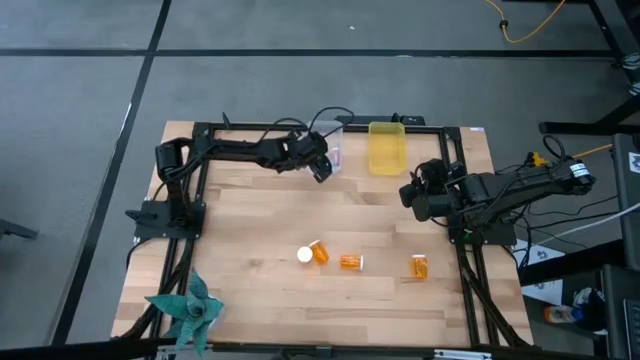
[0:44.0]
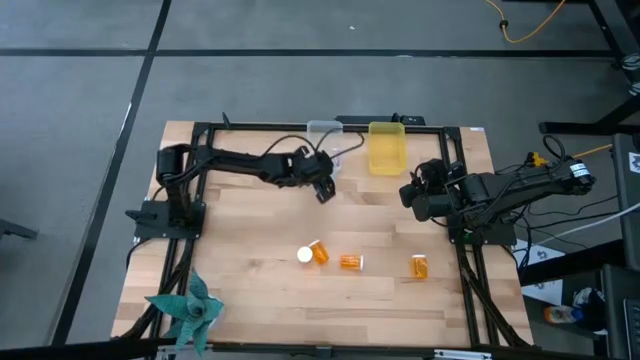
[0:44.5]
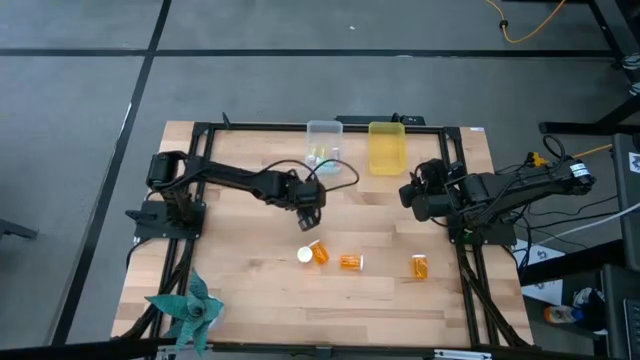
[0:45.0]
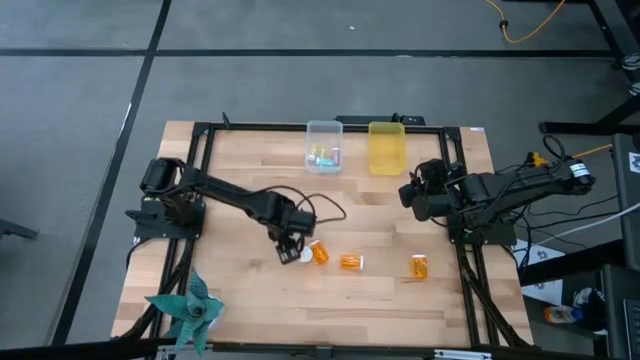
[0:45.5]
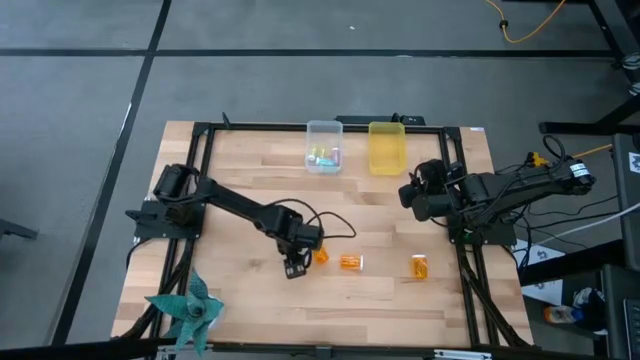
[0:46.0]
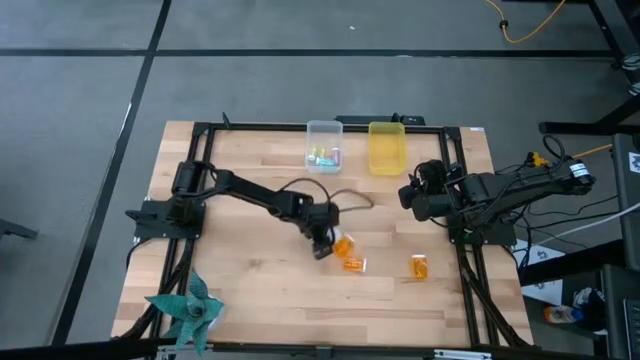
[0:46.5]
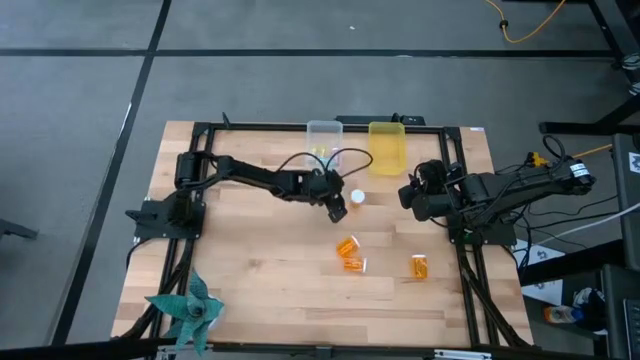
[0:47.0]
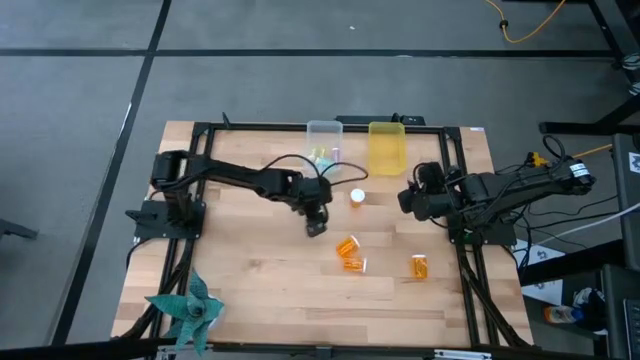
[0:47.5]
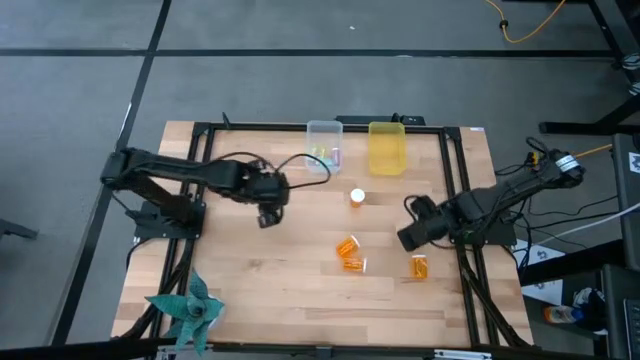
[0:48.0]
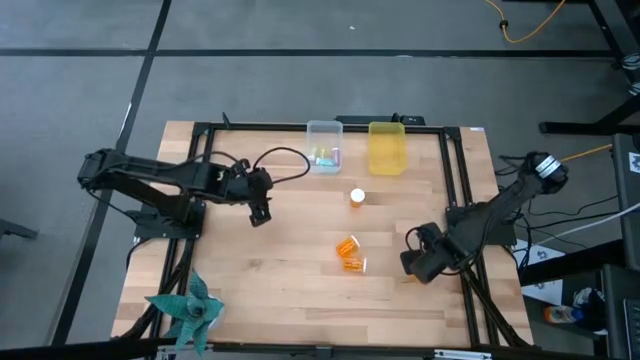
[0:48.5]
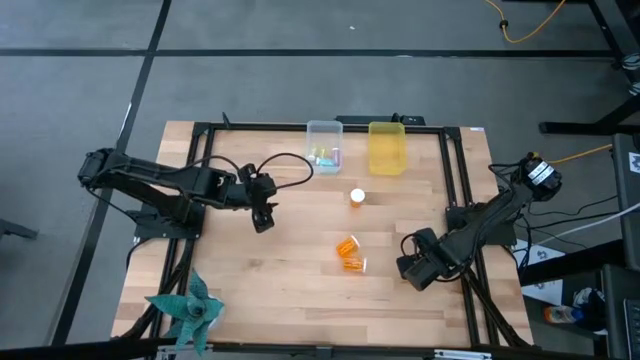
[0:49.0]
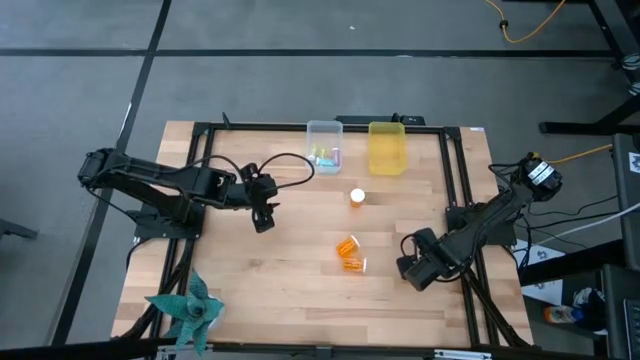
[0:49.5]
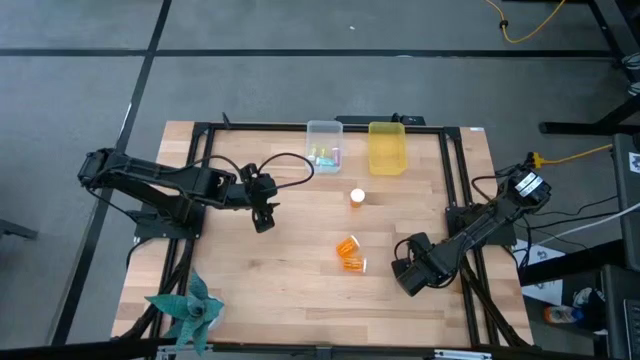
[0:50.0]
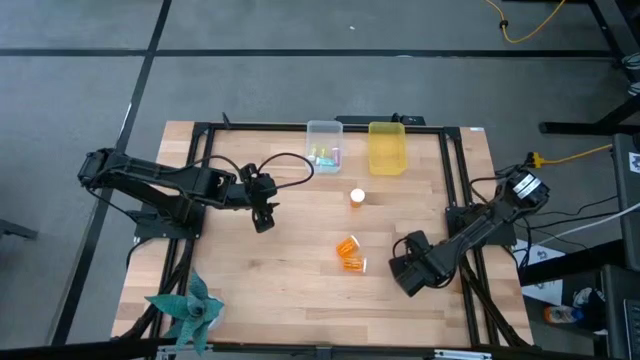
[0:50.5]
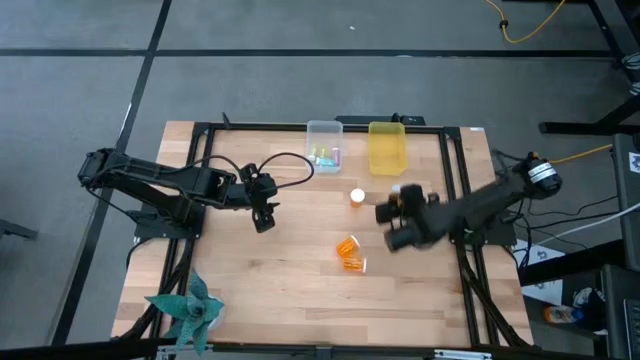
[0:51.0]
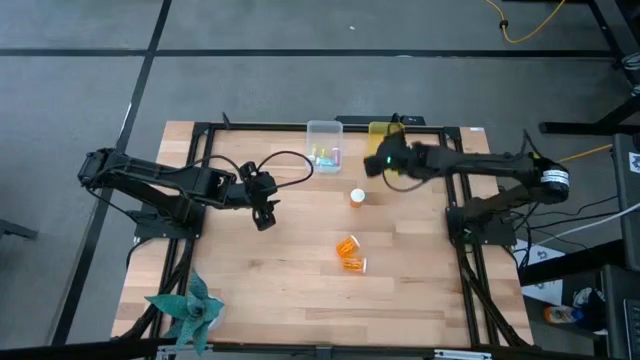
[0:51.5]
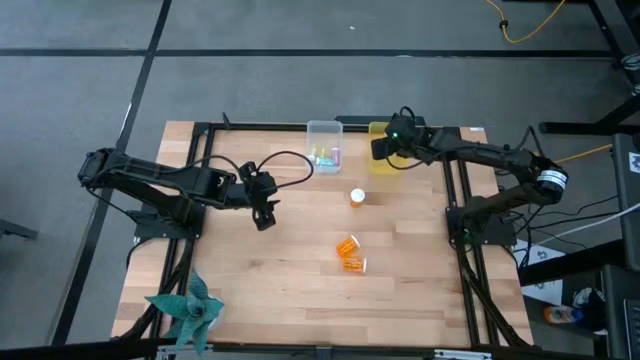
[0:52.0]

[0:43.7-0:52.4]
Task: Pick and place medicine bottles into bin by pill shape (circle, oval)
Put the large orange pill bottle into the yellow bin

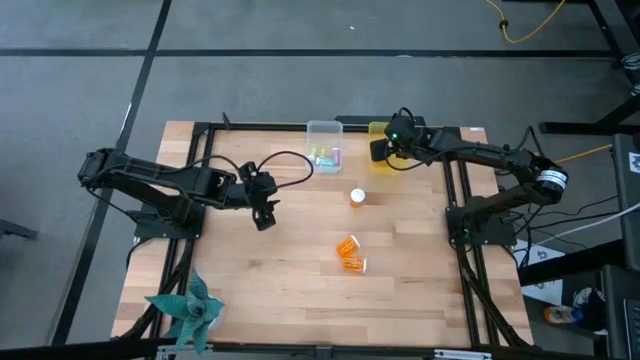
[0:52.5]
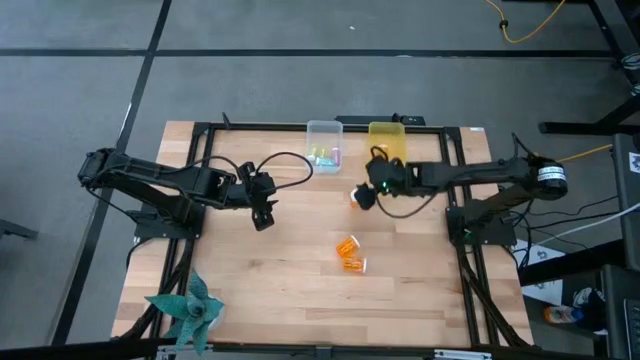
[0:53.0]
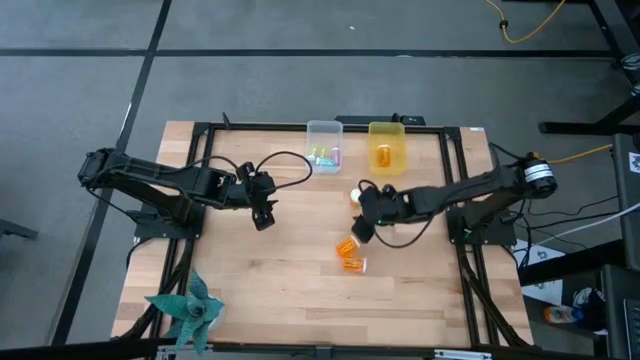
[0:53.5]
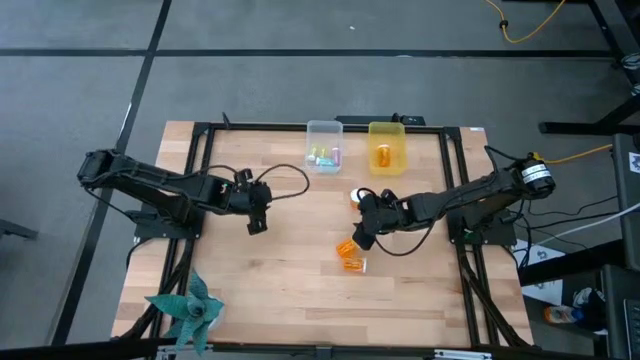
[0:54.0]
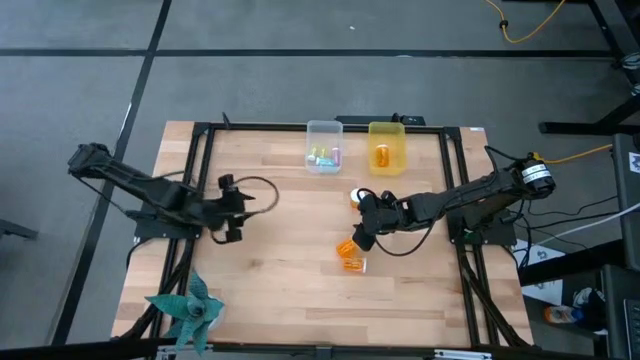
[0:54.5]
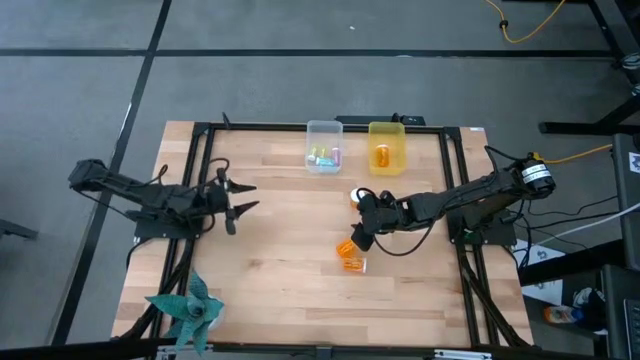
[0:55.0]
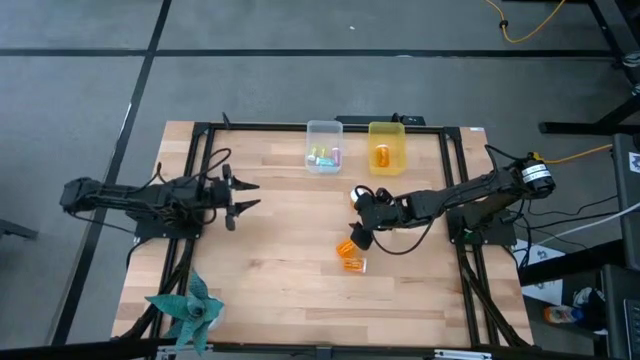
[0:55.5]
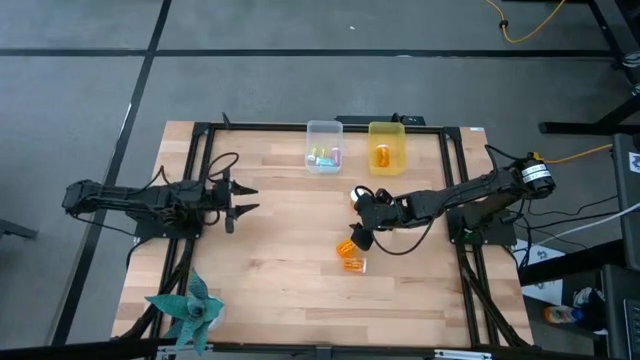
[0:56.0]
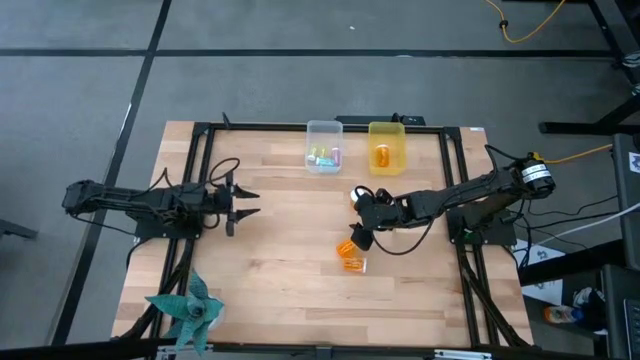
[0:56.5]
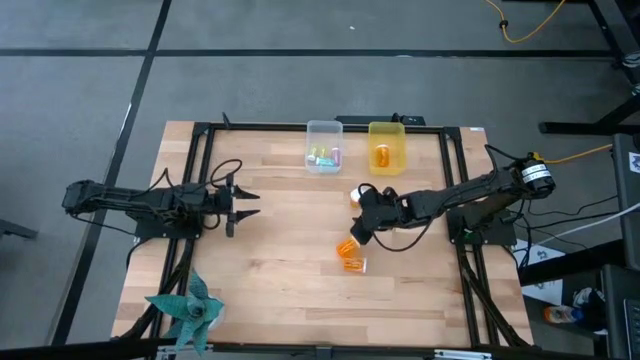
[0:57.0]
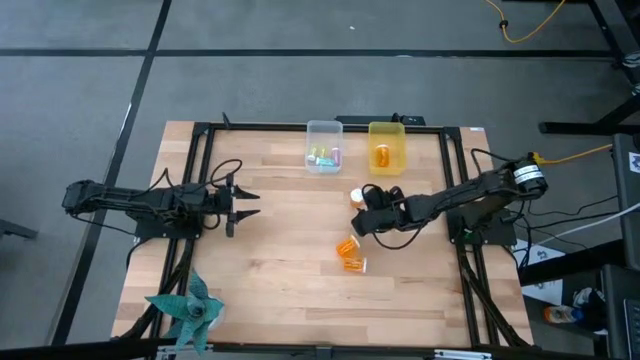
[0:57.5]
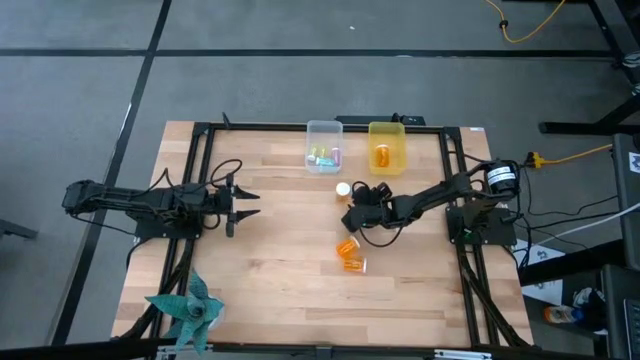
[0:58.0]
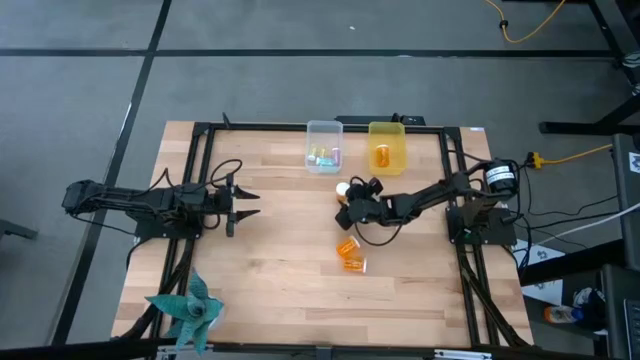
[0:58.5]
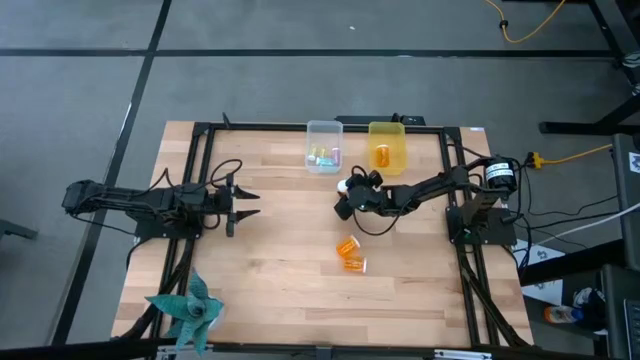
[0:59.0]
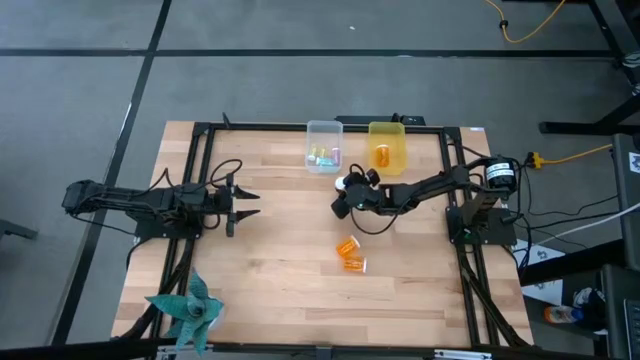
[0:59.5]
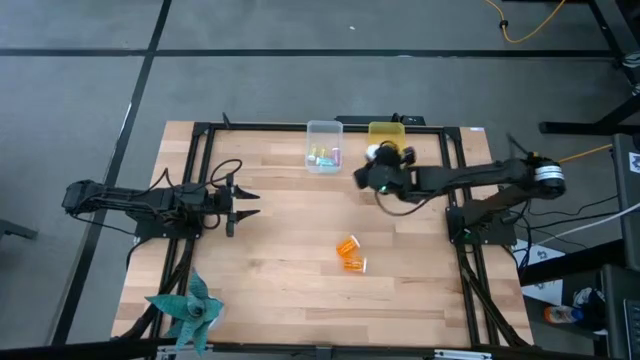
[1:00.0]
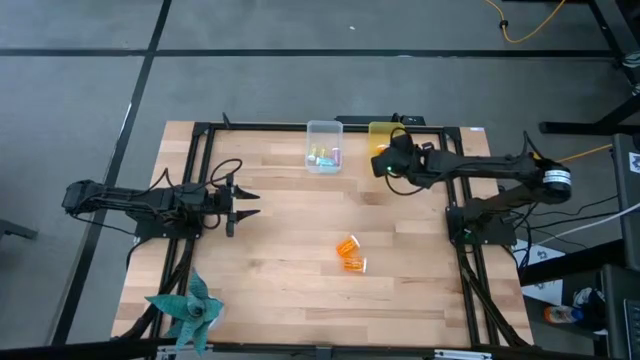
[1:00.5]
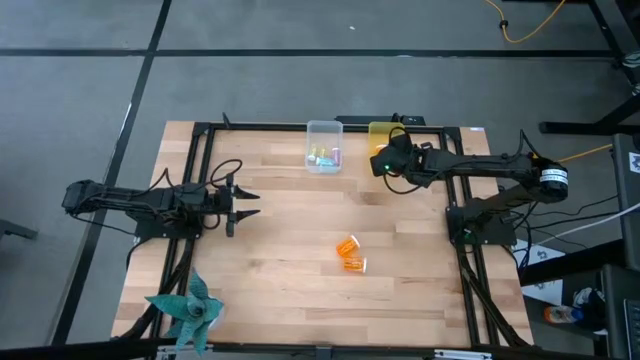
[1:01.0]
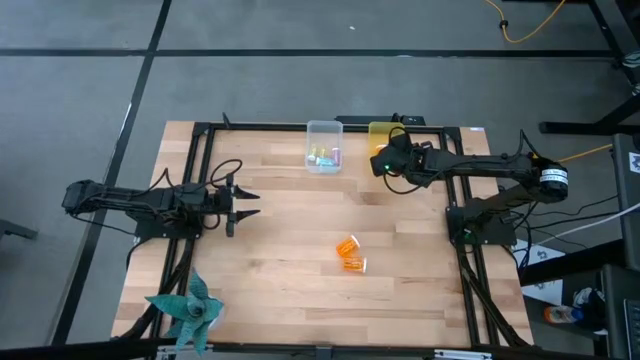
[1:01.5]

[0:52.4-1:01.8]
Put the large orange pill bottle into the yellow bin

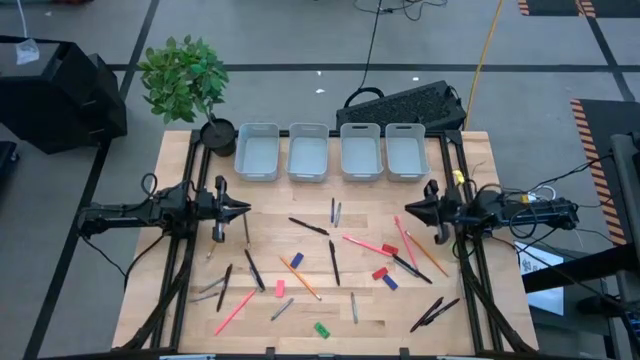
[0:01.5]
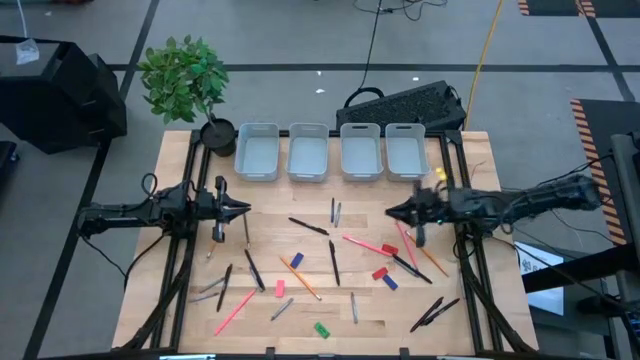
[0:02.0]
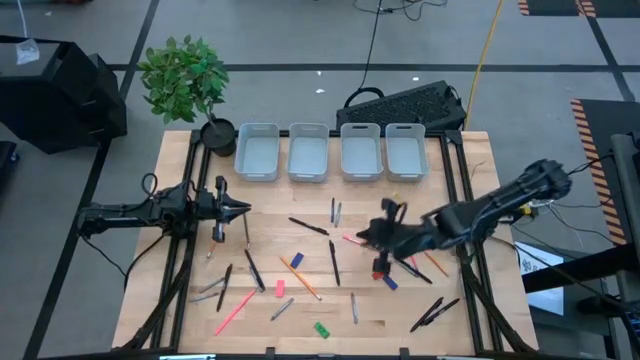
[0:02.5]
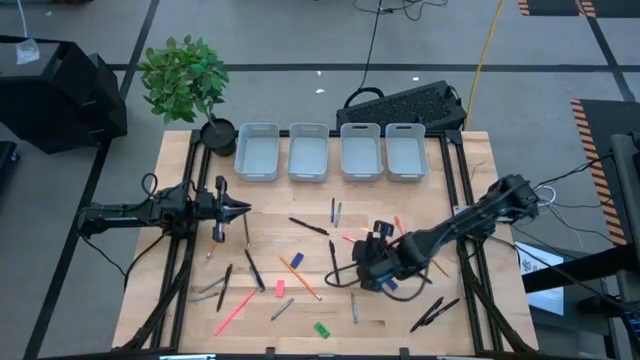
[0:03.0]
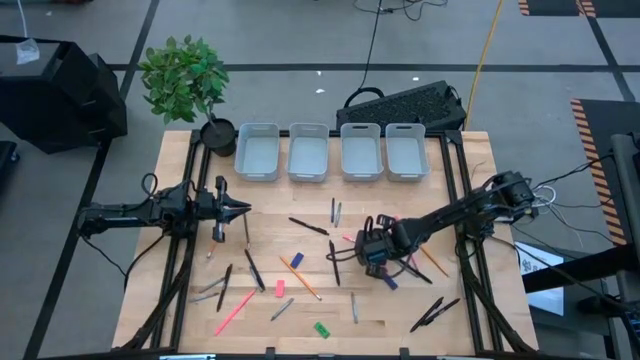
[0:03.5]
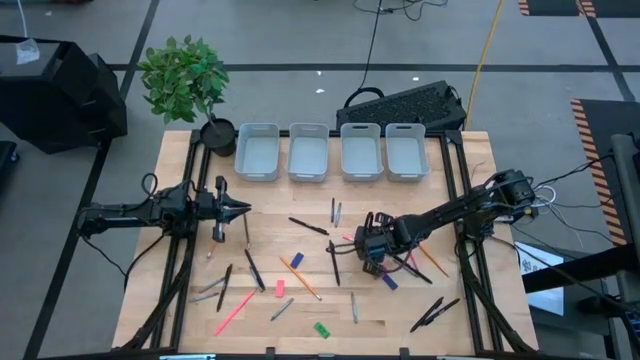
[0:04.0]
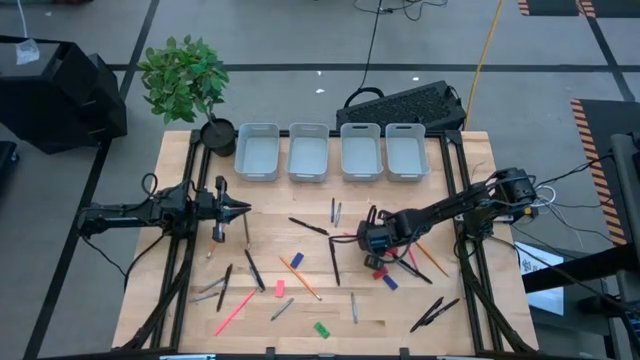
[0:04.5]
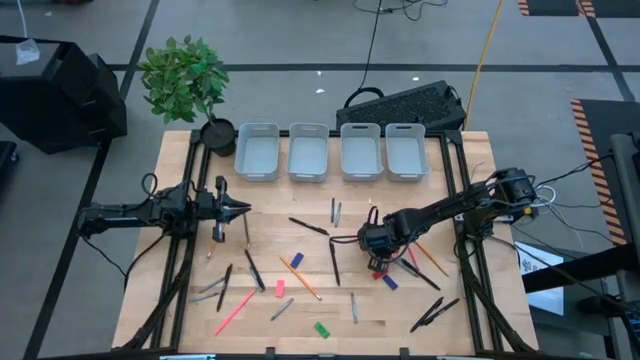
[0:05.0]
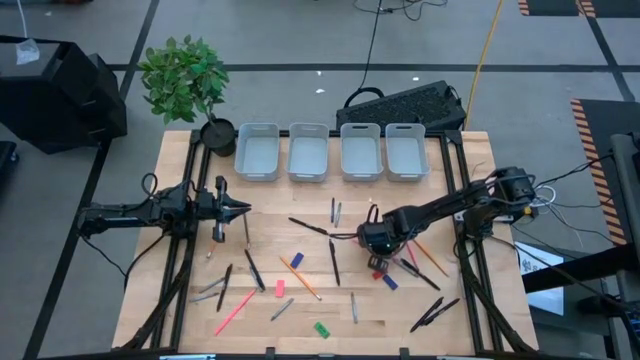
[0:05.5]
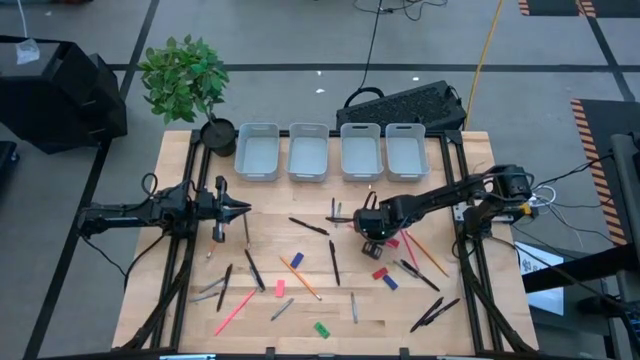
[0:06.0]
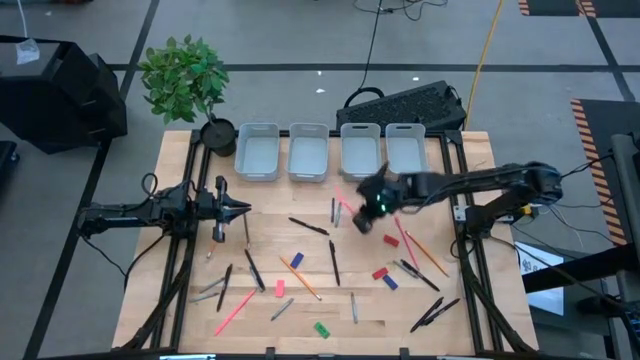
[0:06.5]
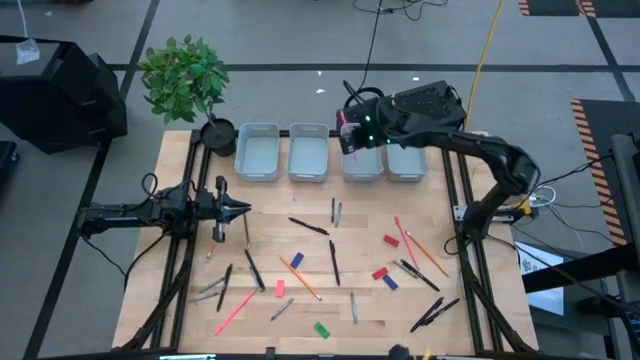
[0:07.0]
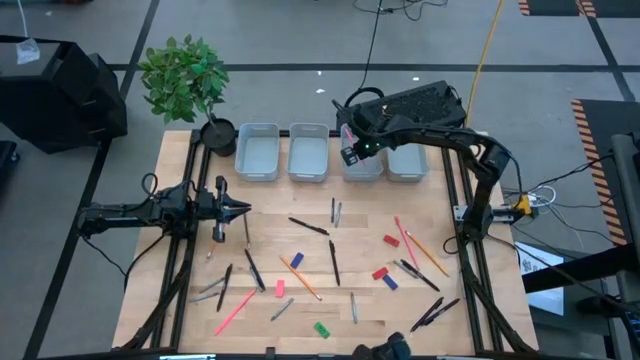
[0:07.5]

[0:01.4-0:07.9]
Task: Sort crayons/erasers/pens/pencils in bins
Put the pink pencil into the middle right gray bin
